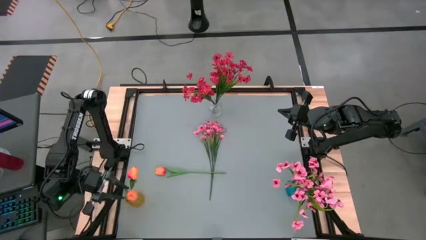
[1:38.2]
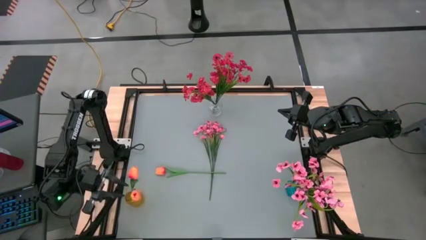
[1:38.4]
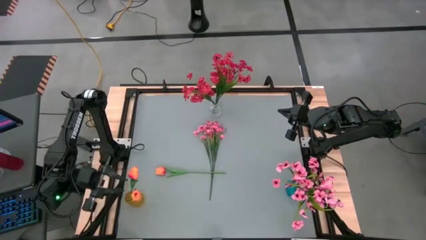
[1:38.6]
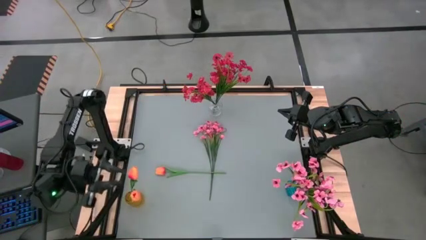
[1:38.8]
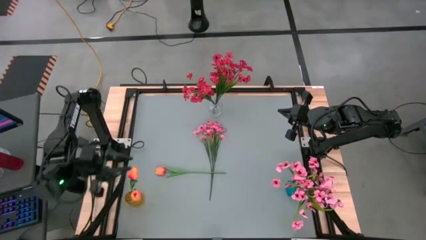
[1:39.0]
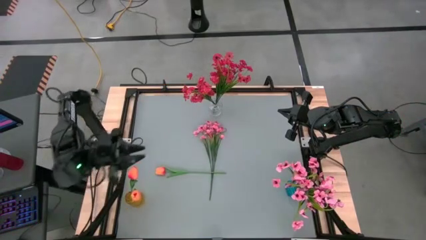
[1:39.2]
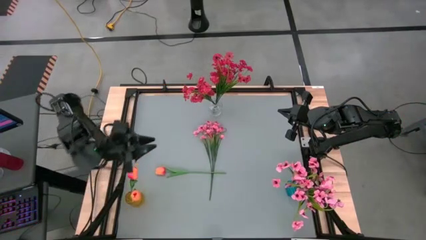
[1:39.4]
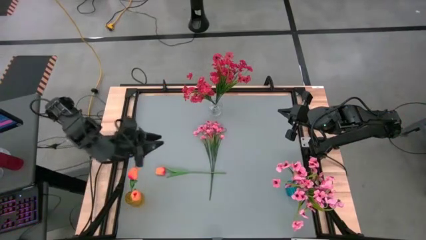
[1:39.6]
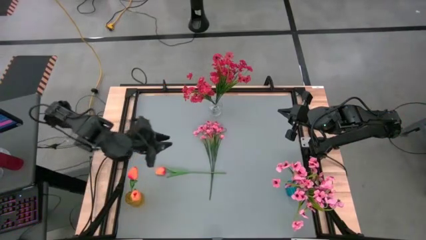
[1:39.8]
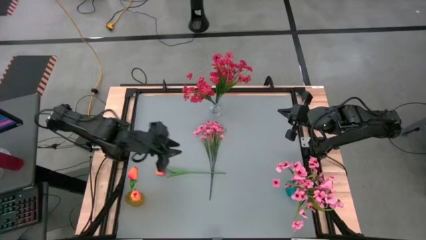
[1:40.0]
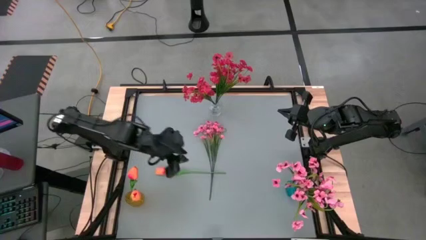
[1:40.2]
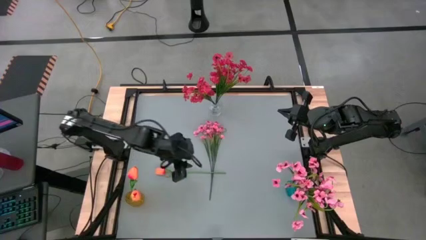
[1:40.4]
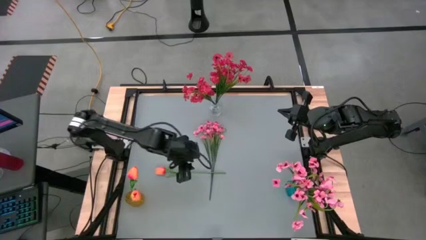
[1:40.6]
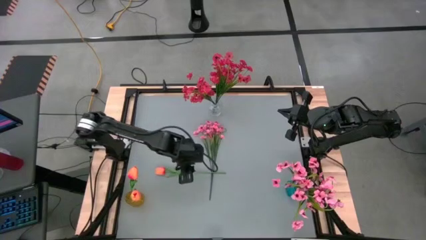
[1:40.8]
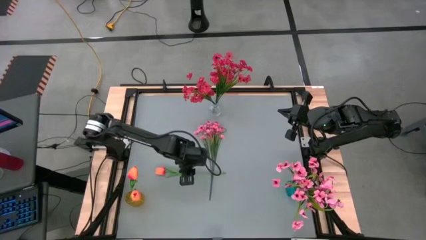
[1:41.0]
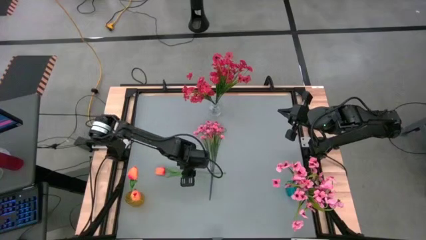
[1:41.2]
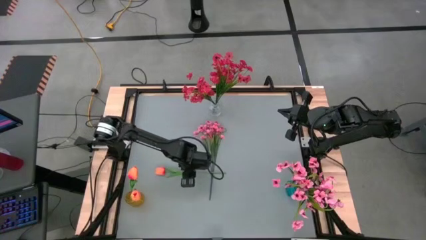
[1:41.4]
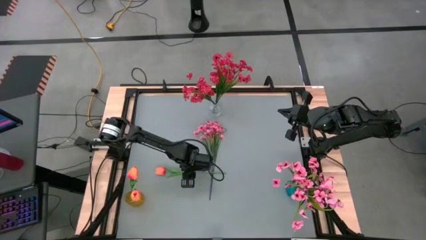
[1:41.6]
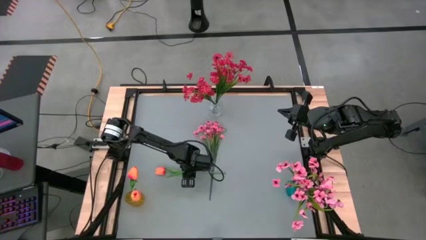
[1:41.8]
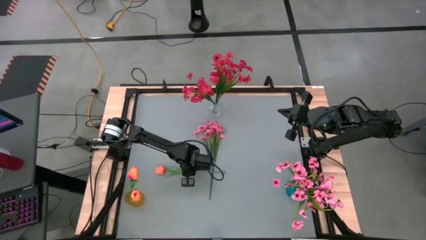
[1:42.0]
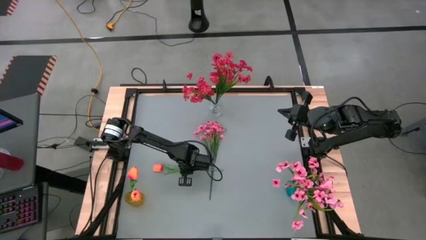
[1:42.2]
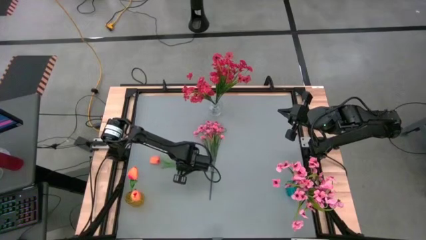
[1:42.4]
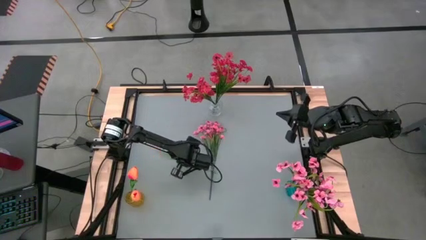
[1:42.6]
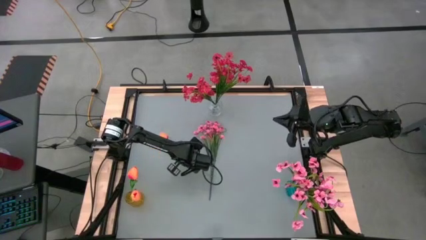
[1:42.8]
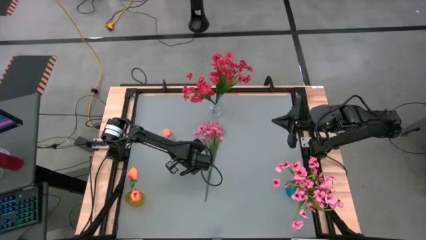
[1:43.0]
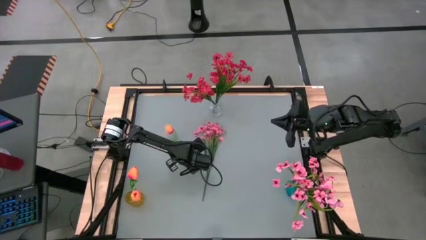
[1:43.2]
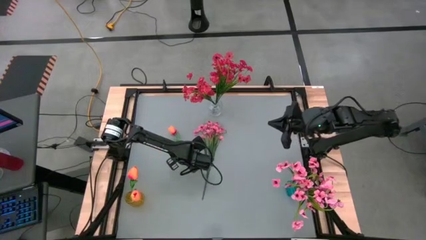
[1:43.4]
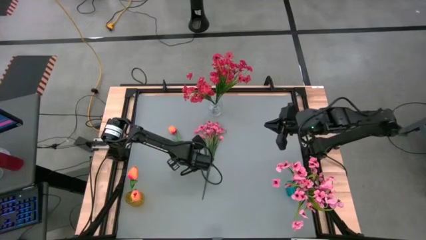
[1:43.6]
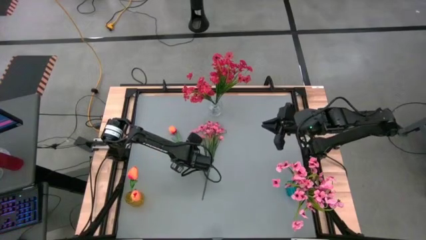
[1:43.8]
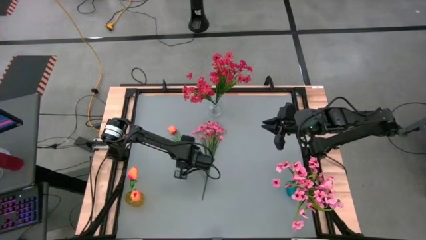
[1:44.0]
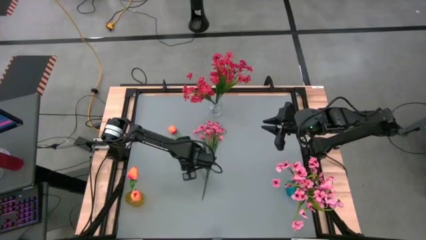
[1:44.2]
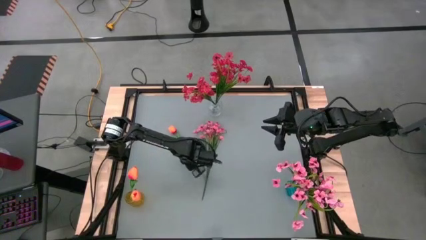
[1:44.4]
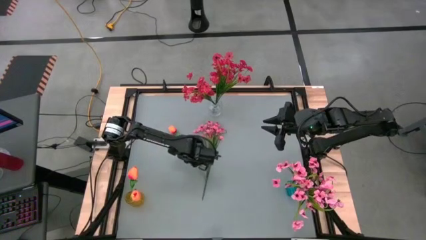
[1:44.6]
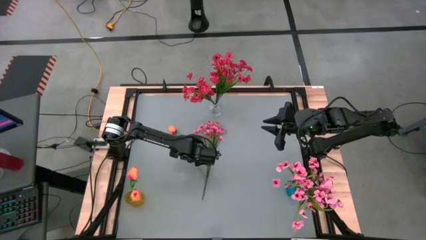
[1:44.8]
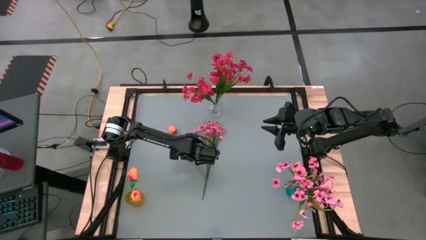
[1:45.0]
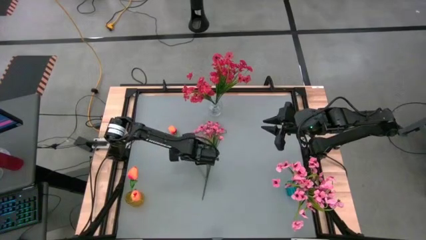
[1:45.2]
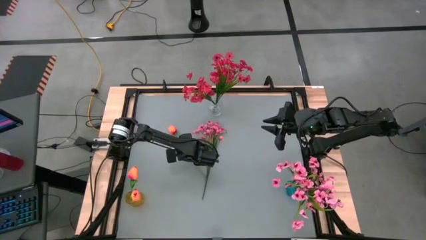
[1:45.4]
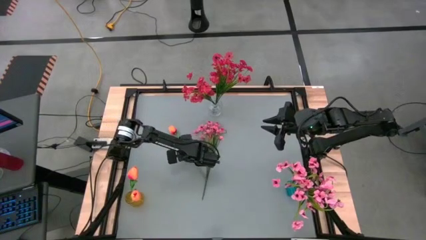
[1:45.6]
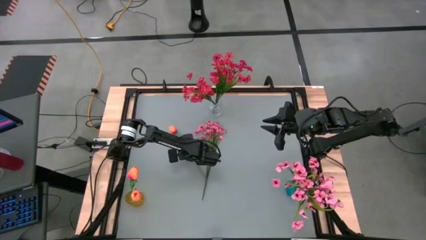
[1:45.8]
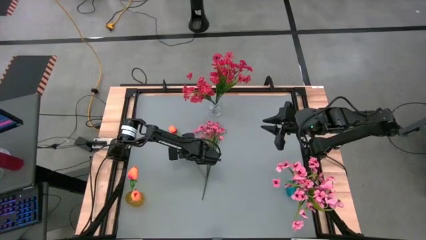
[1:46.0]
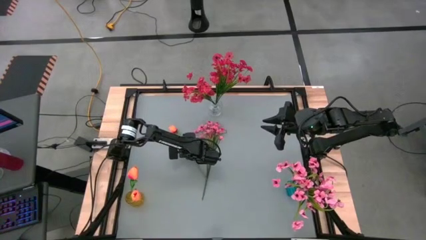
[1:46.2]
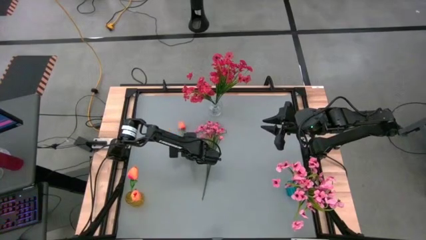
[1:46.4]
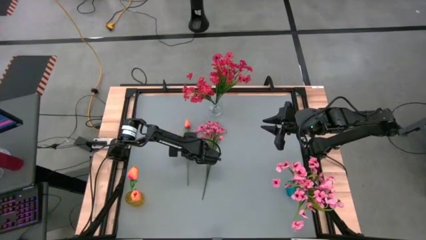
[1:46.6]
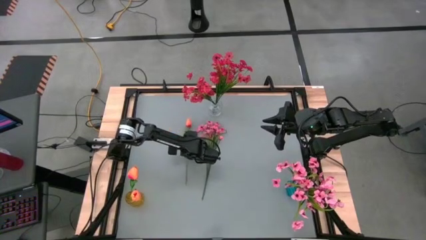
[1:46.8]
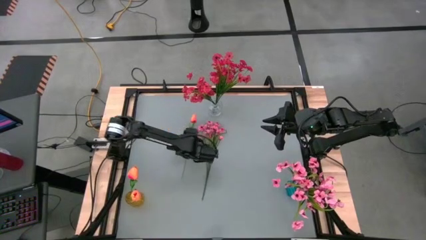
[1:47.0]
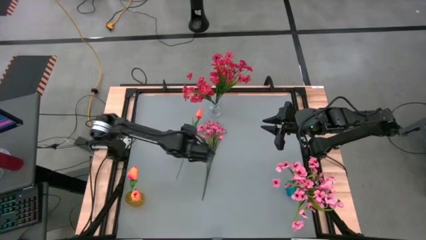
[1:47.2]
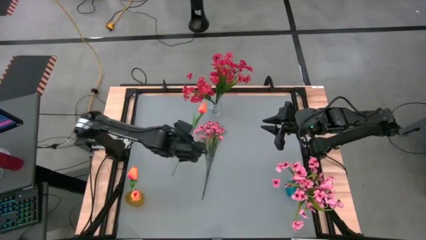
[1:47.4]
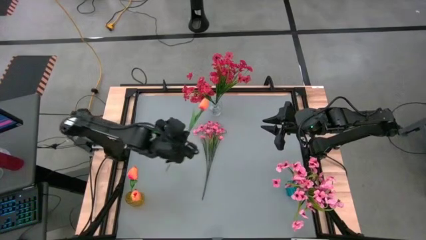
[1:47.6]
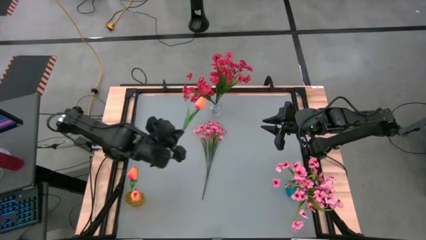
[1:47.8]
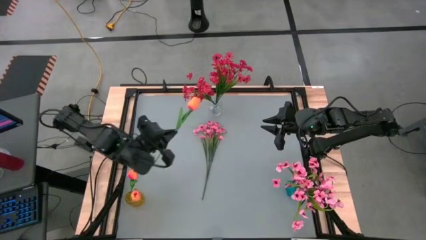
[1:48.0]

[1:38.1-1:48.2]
Task: Sort flowers into vase by color
Put the orange tulip flower into the yellow vase

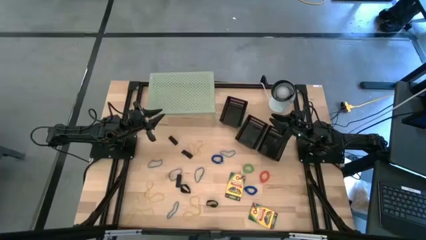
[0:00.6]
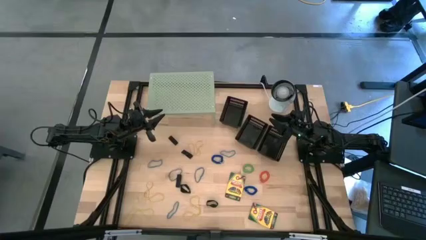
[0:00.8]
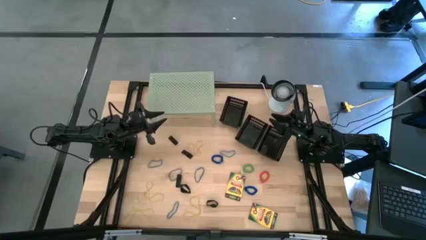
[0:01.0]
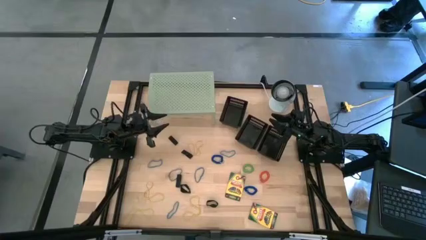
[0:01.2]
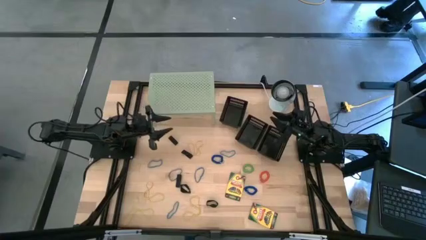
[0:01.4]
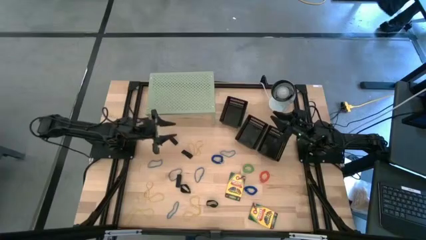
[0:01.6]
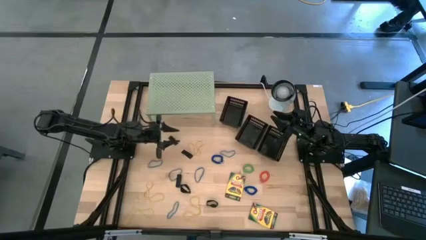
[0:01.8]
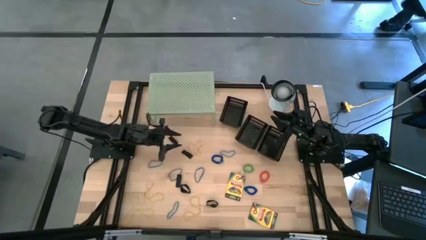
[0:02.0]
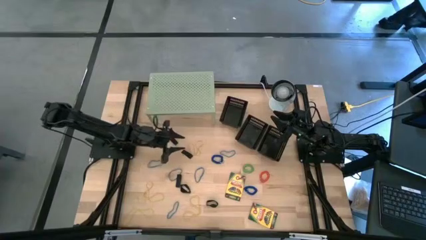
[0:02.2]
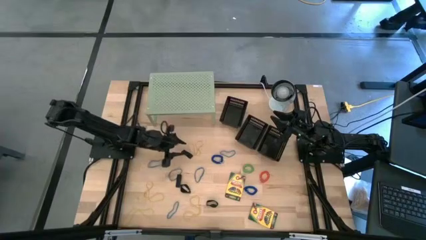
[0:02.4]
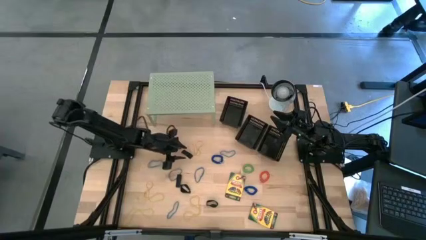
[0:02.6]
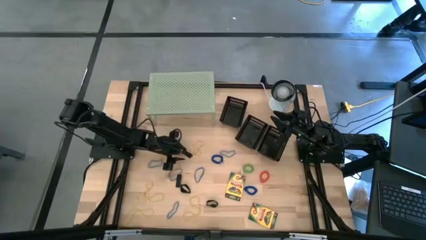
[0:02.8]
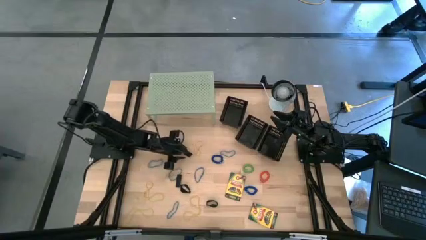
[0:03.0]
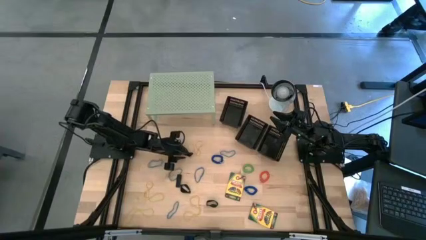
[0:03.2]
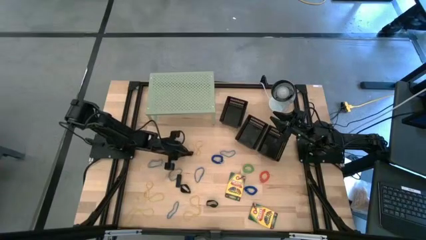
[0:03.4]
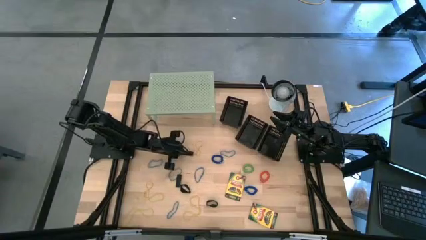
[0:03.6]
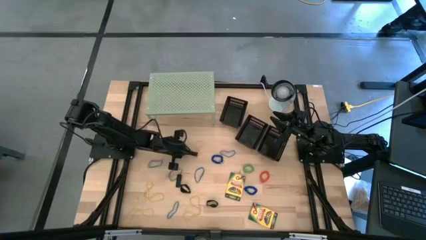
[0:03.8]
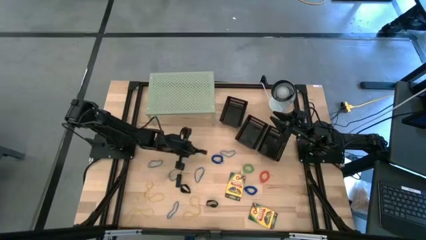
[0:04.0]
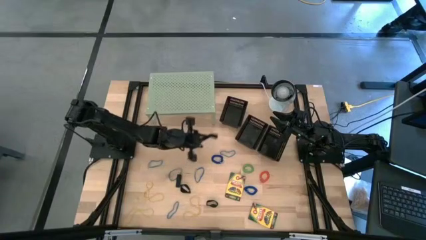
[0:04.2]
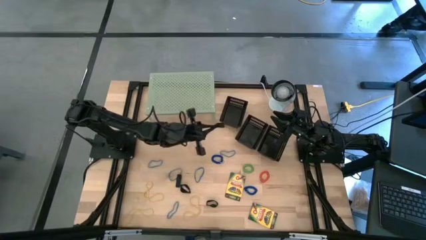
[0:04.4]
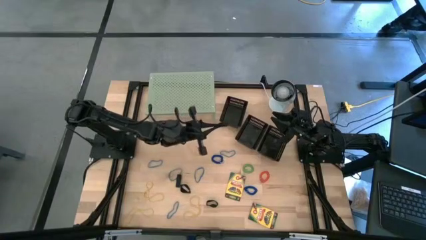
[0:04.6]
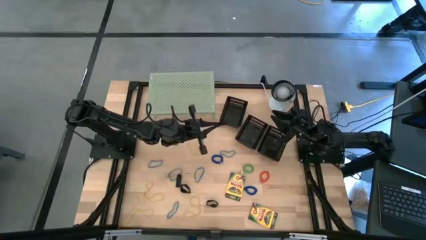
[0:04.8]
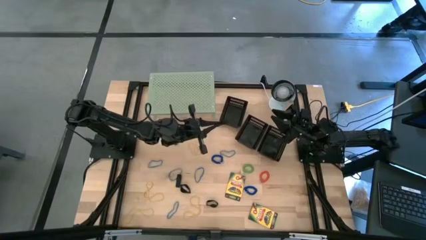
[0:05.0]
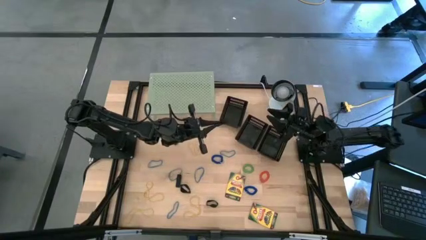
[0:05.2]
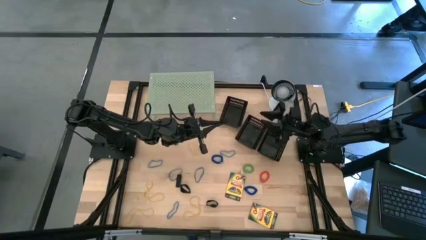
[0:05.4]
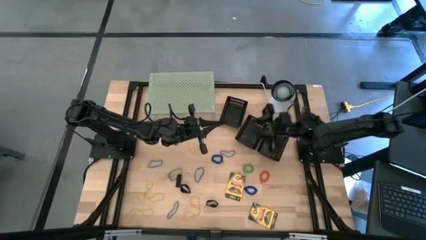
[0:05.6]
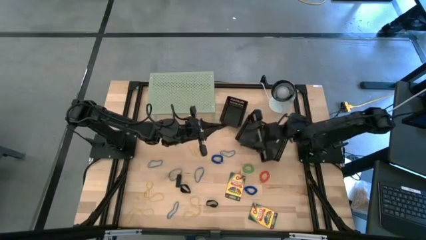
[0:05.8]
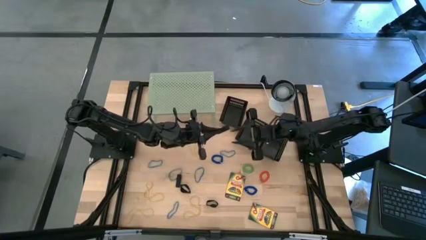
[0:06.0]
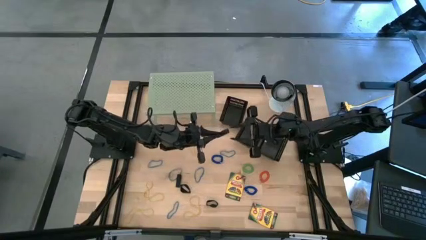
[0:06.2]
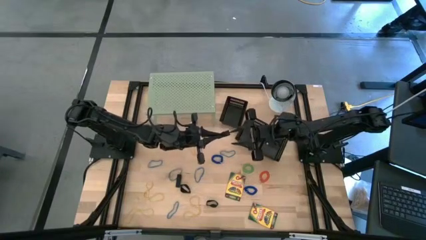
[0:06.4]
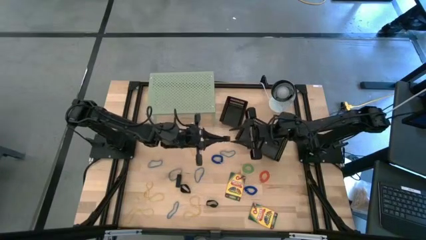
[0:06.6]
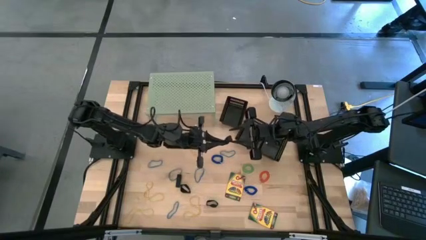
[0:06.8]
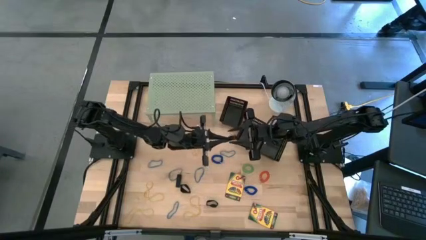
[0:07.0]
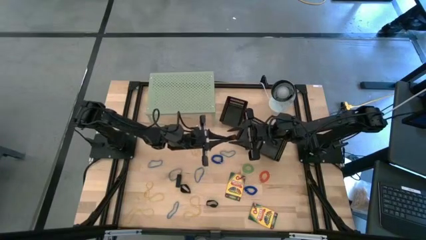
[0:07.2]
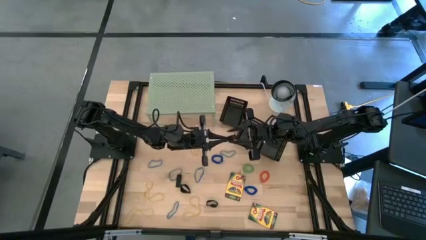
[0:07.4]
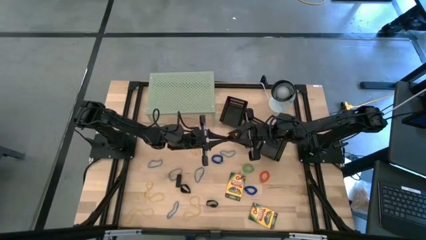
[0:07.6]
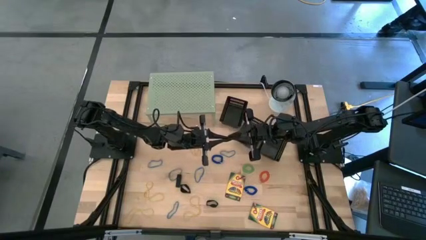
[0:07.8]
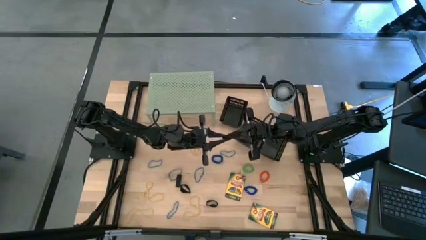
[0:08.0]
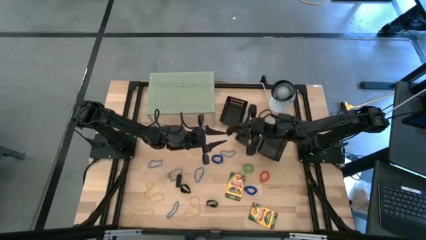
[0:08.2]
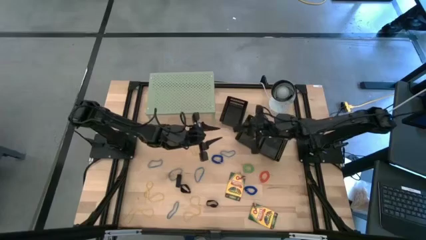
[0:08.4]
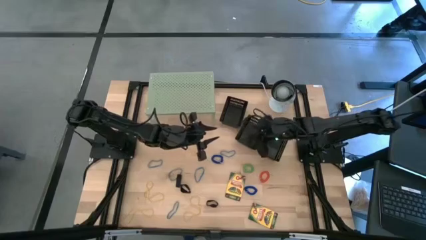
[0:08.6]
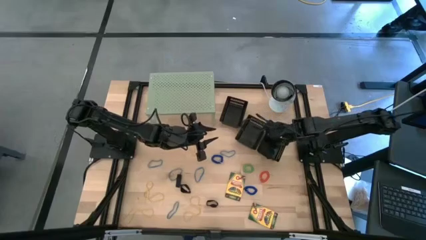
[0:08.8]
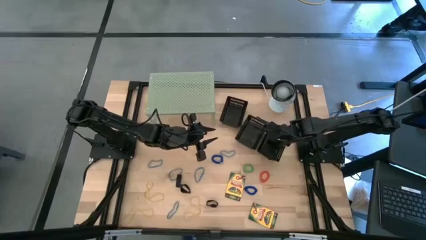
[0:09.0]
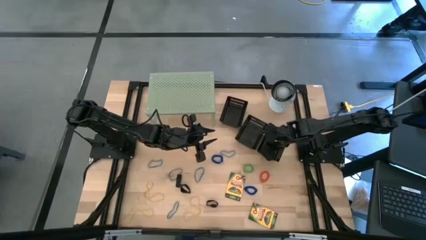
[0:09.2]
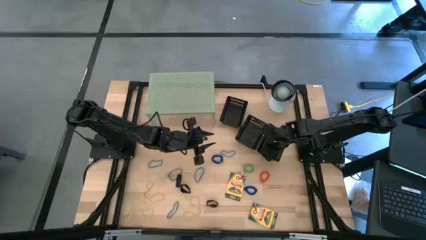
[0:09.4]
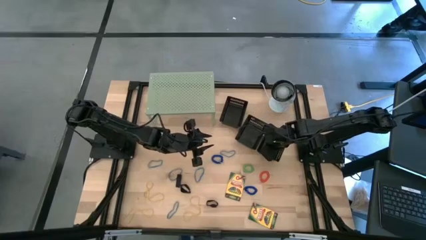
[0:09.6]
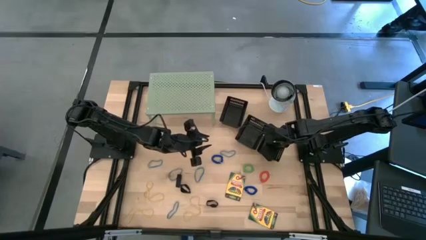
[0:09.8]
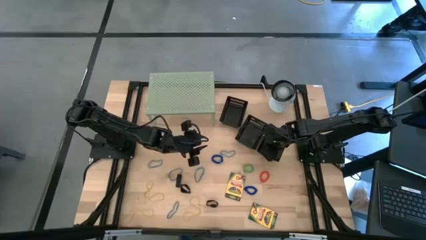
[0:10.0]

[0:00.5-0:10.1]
Task: Pick & Place Office Desk Supplies
Put the black rubber into the bottom black bin
